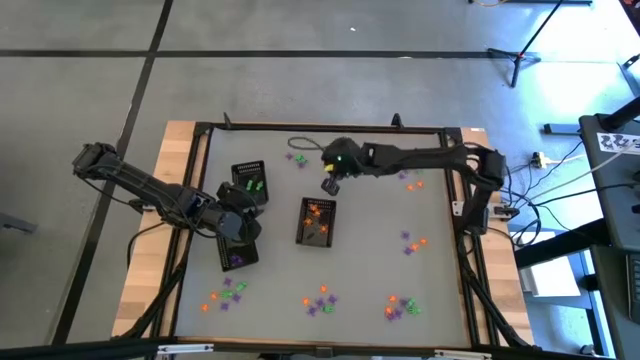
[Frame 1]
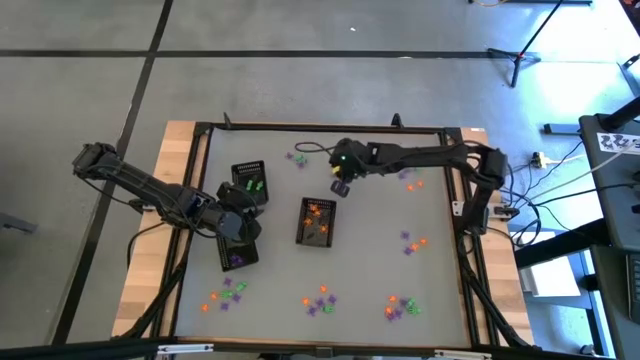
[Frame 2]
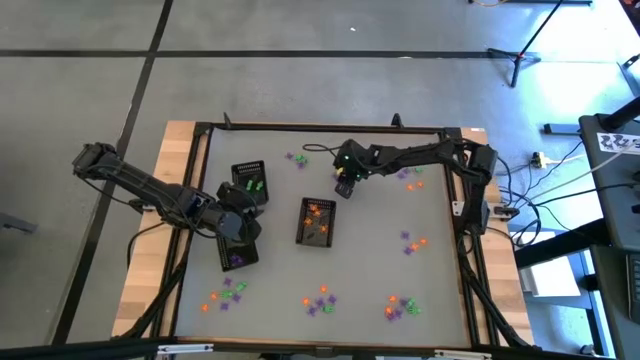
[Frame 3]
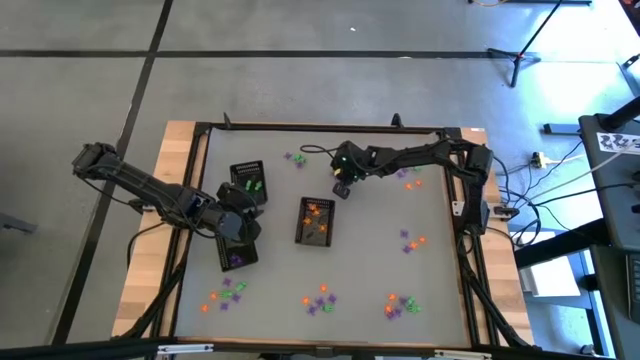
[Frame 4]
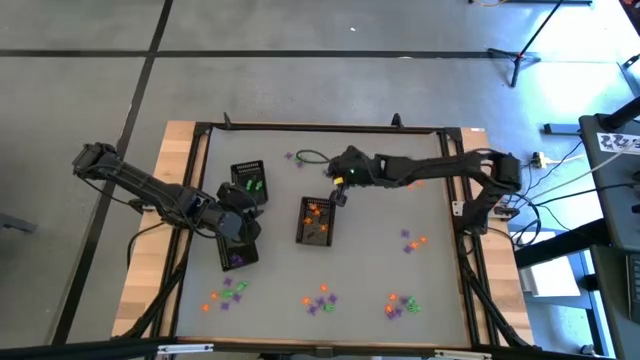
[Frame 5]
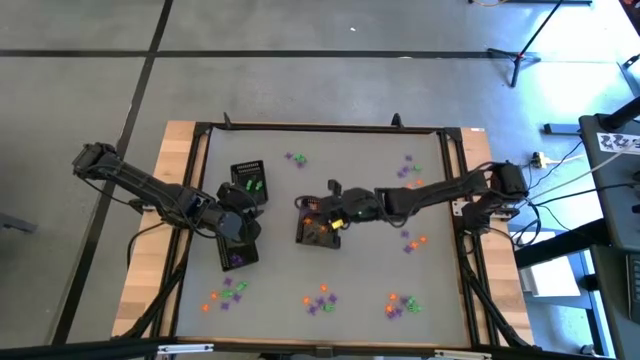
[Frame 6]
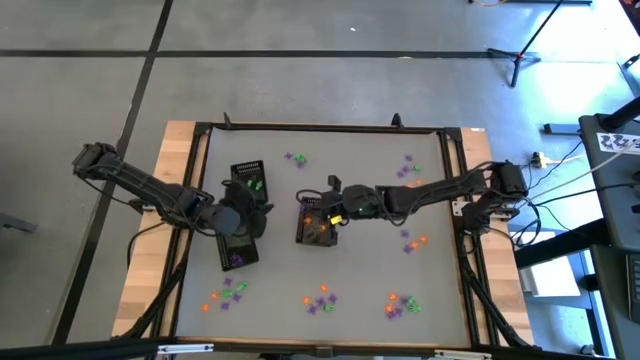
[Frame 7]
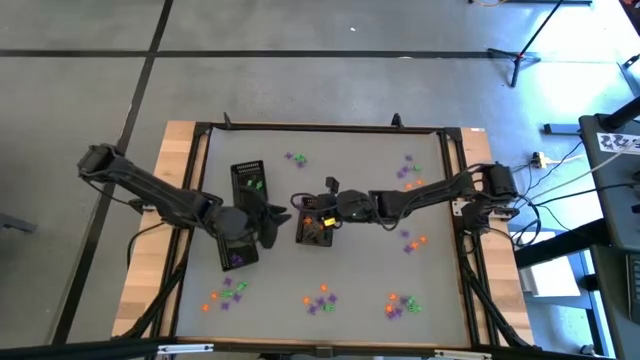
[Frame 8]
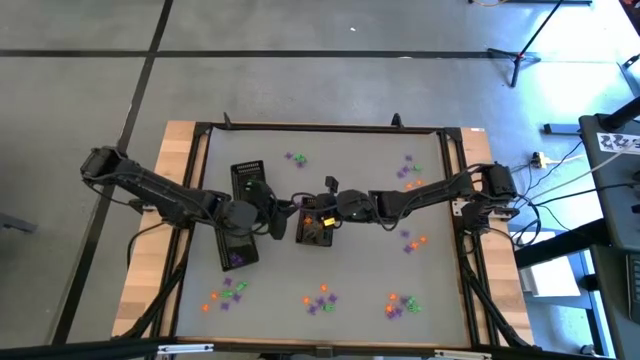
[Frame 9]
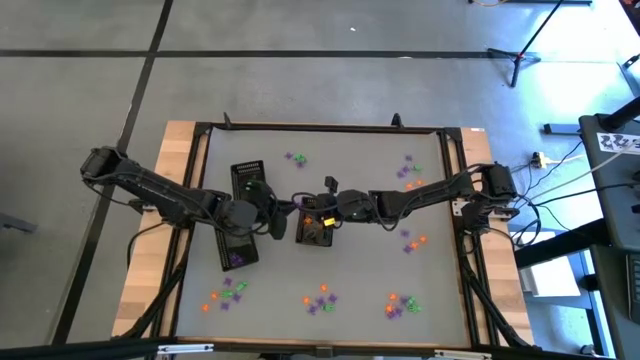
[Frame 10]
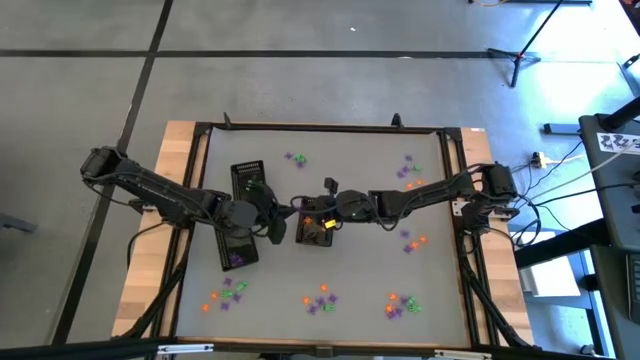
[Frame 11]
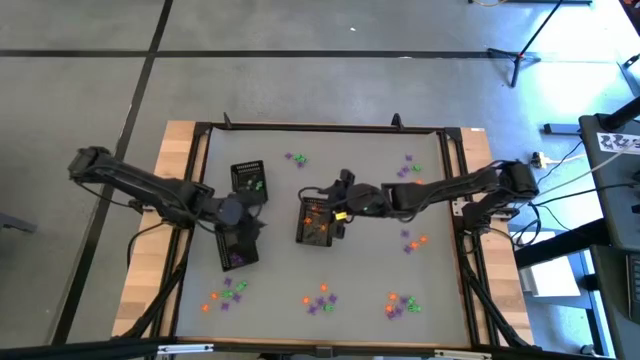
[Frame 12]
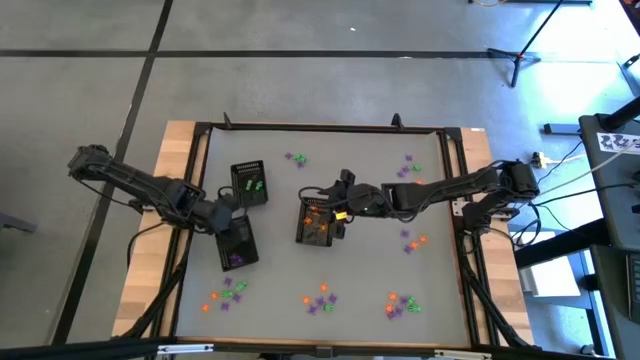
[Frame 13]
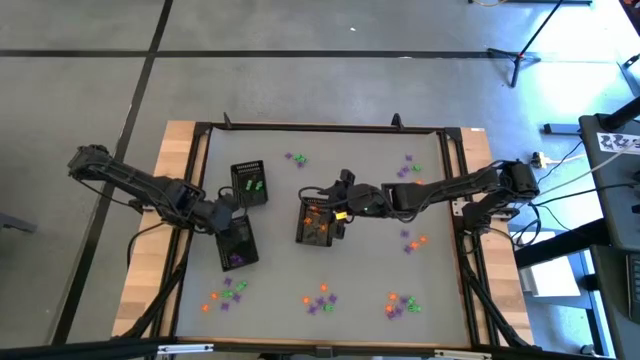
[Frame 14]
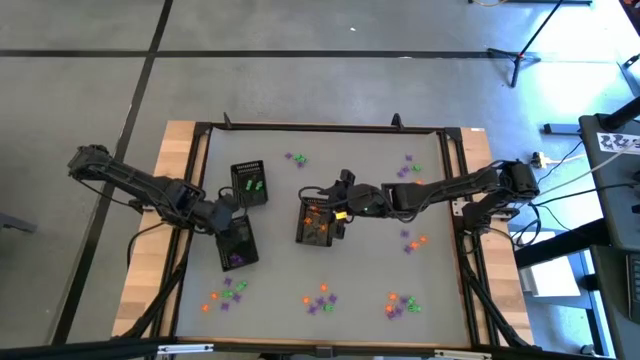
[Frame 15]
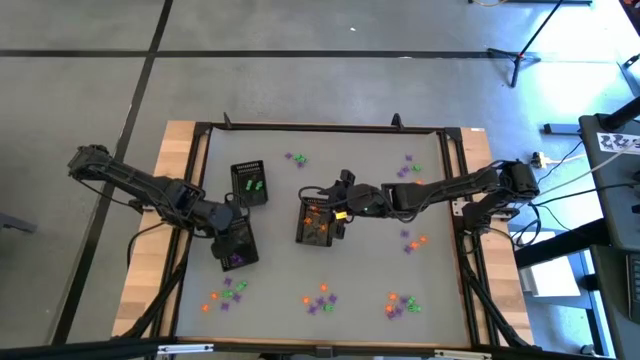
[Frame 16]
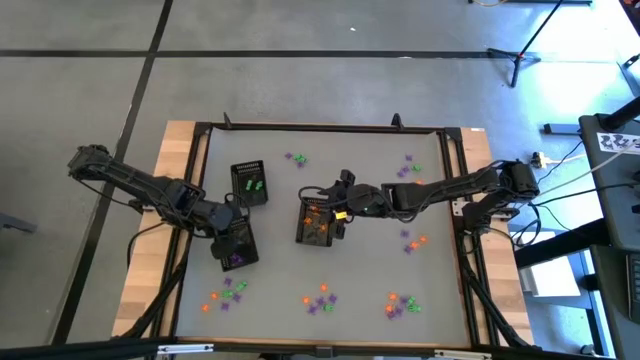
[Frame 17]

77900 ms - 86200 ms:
Task: Sort Halloween decoration
Put the purple spider toy into the bottom left black basket

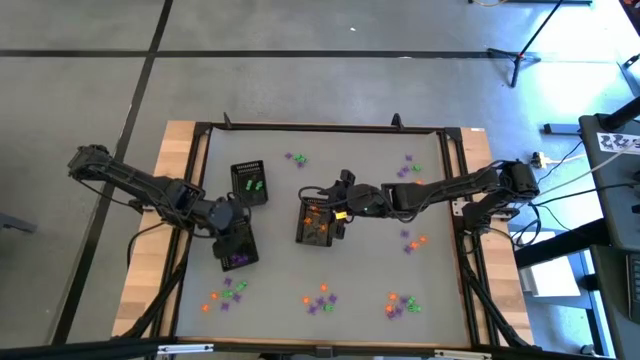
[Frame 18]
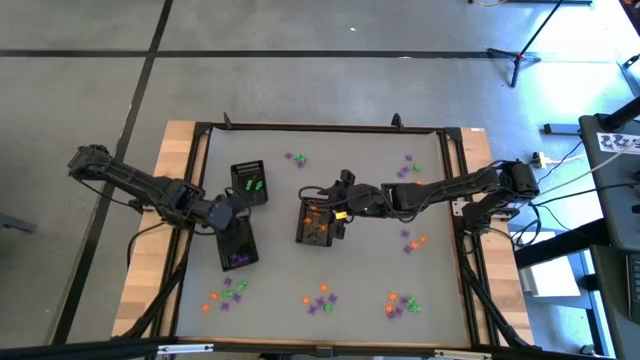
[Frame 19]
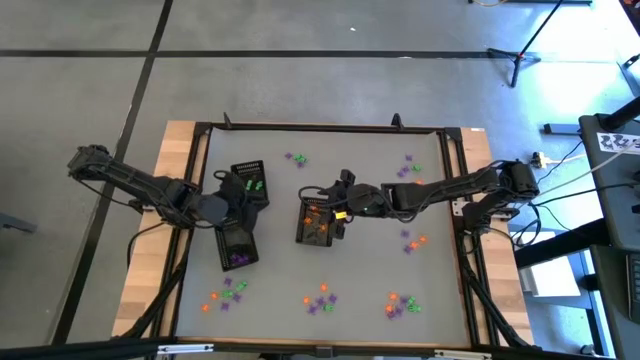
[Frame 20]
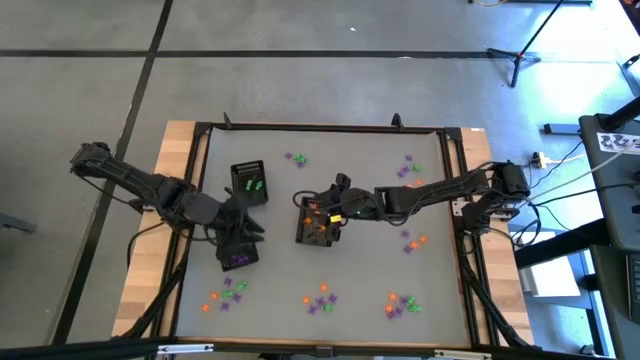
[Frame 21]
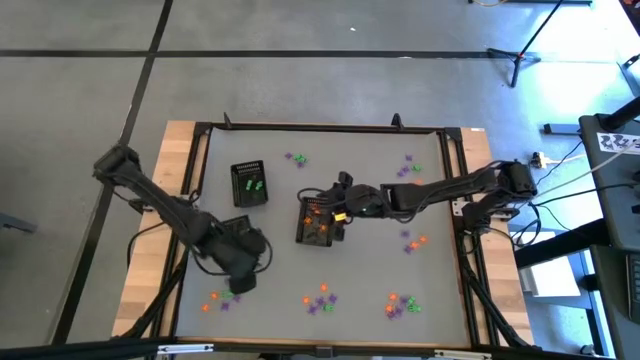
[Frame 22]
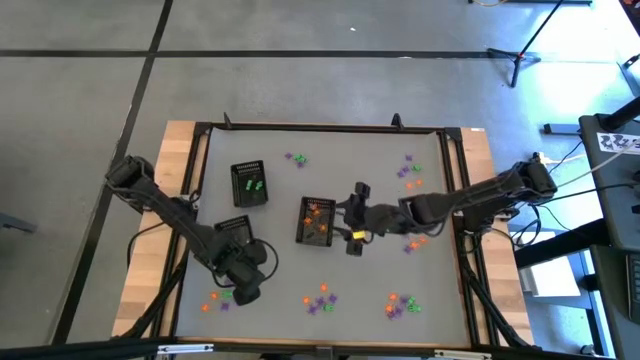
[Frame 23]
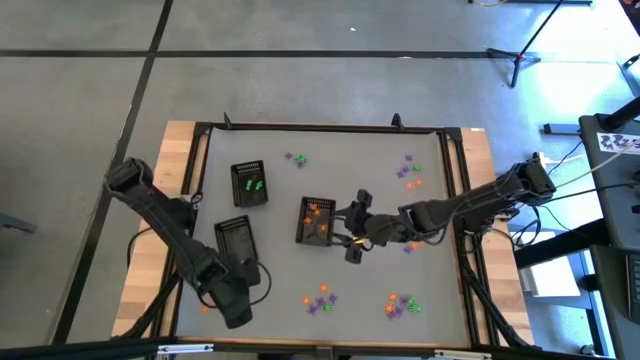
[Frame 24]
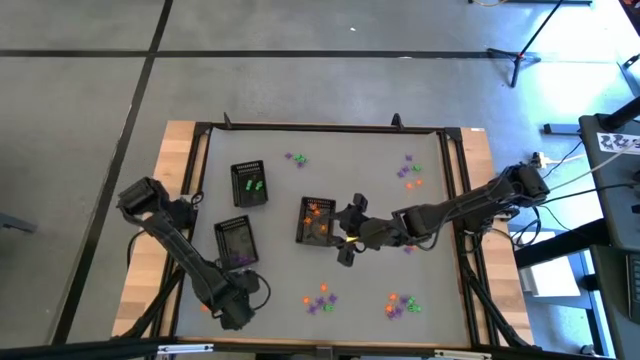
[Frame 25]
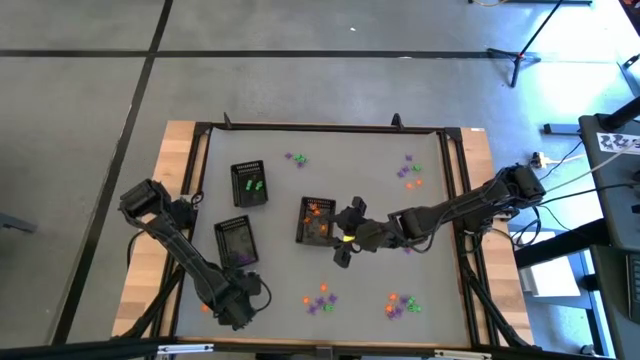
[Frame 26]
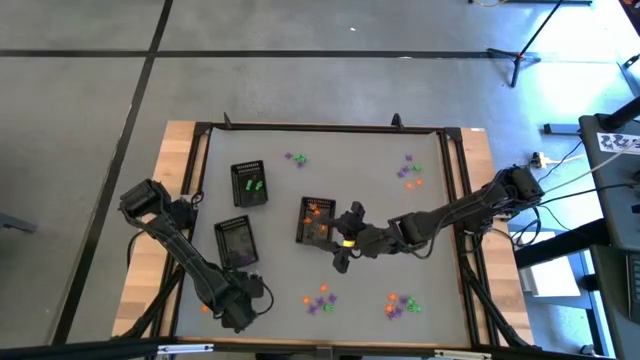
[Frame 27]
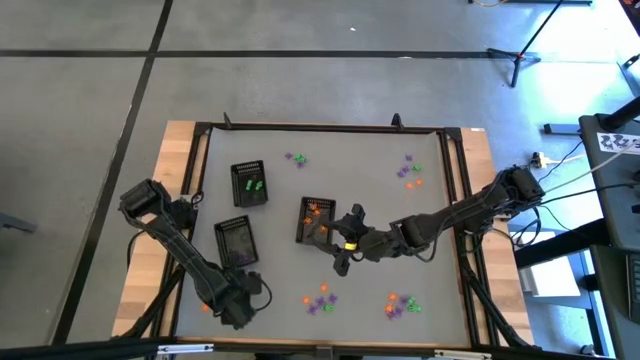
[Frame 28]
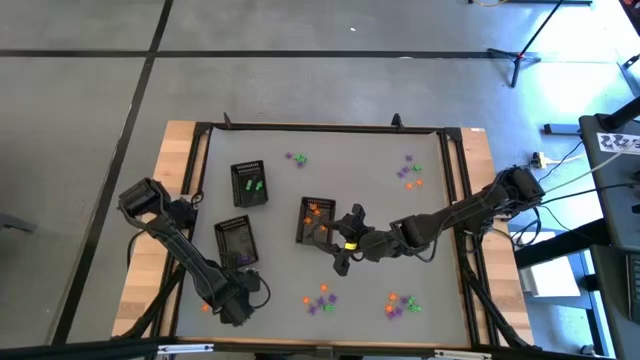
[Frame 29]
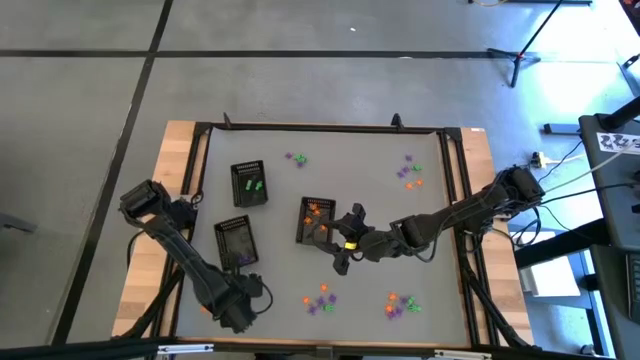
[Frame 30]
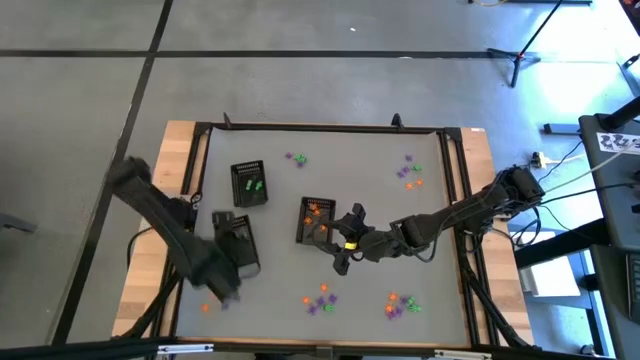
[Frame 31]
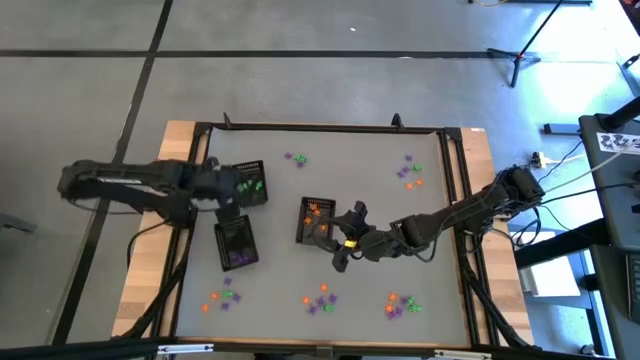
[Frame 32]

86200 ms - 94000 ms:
Put the green alien toy into the top left black basket

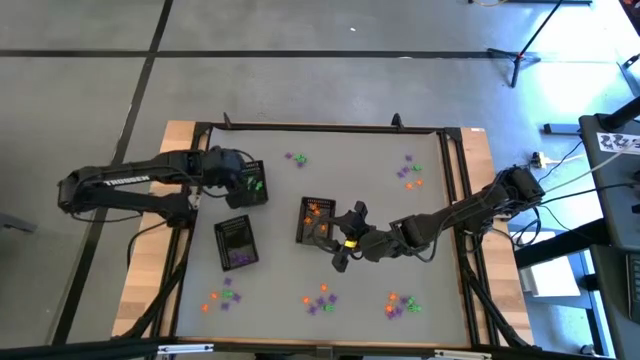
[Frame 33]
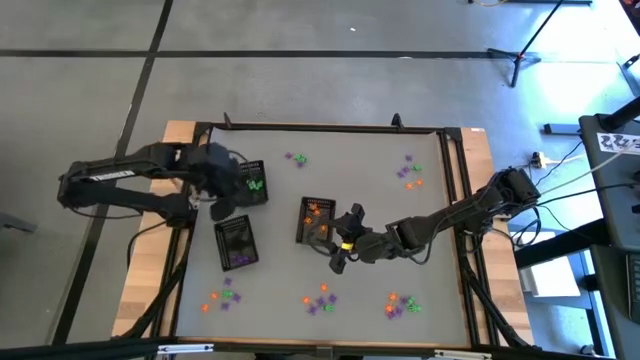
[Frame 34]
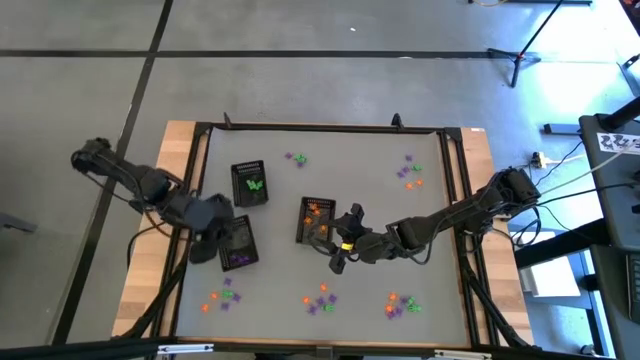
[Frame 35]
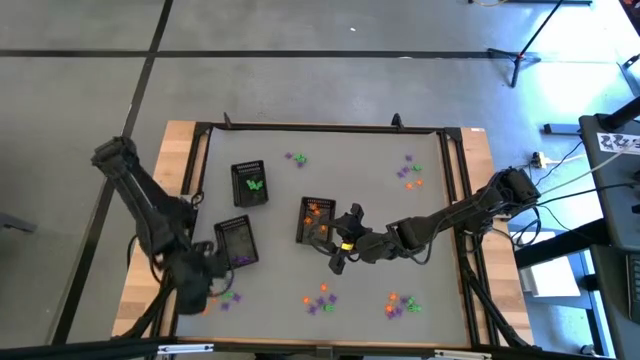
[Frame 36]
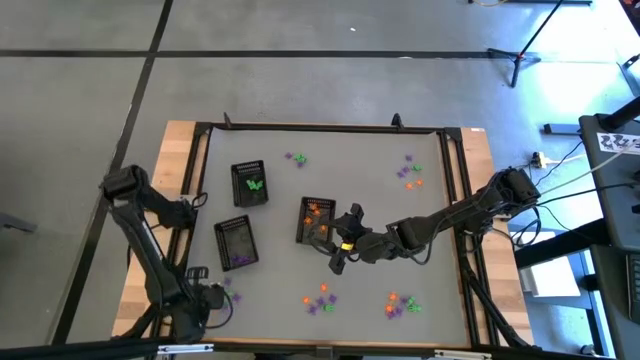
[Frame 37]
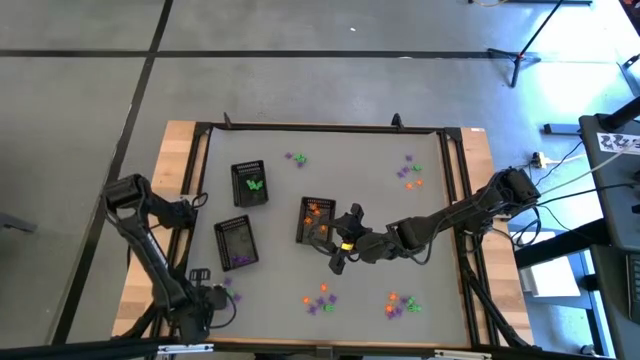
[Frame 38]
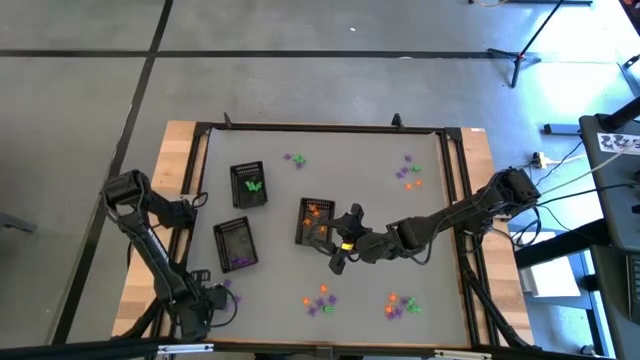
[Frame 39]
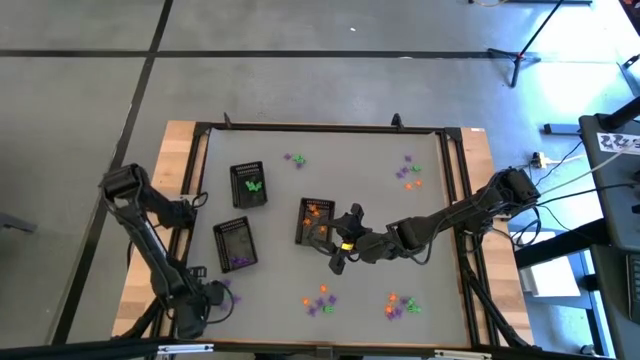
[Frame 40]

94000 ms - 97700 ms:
Put the orange spider toy into the bottom right black basket

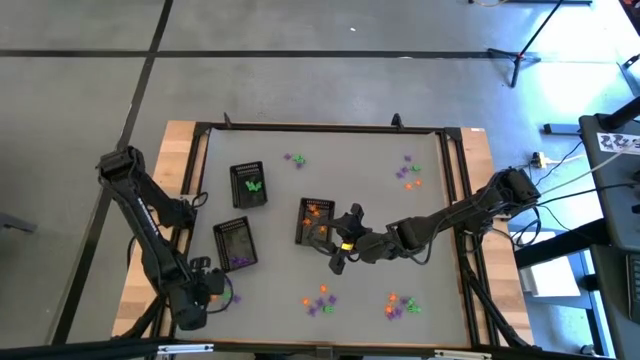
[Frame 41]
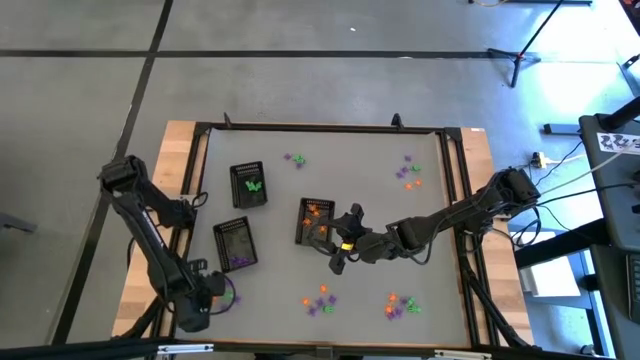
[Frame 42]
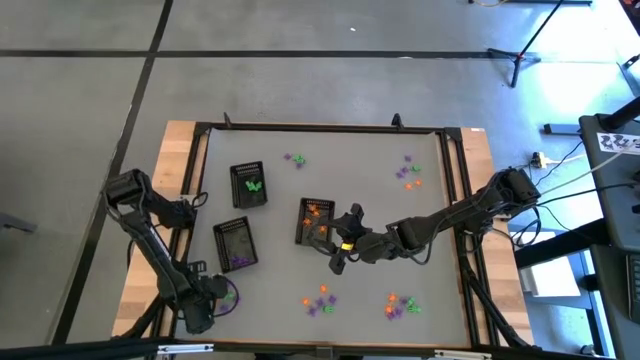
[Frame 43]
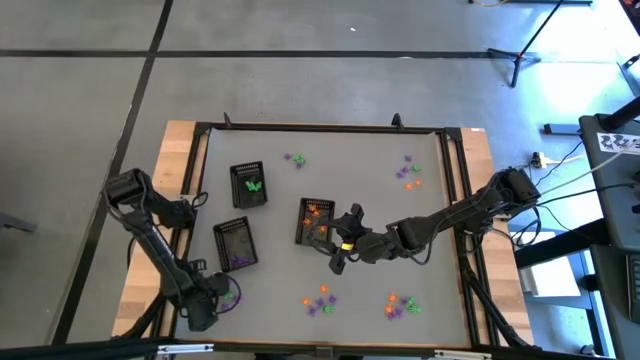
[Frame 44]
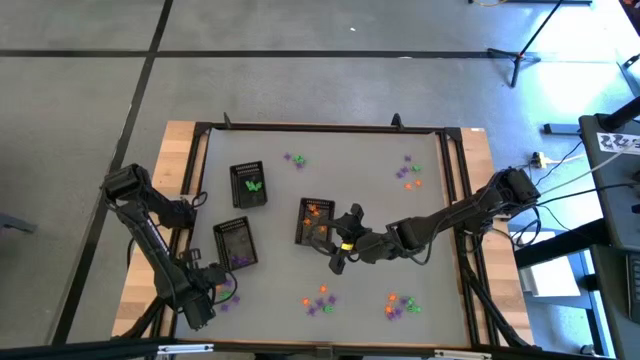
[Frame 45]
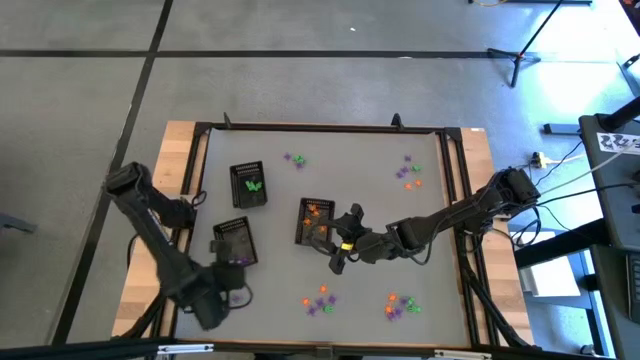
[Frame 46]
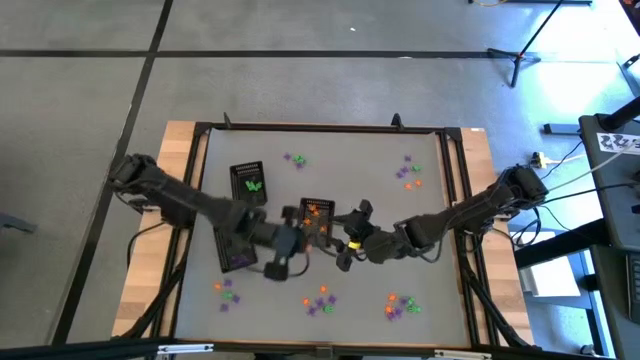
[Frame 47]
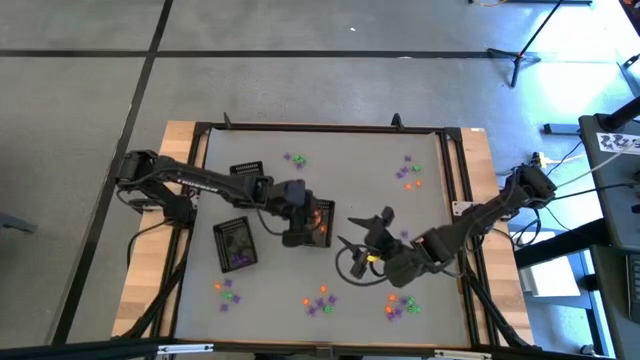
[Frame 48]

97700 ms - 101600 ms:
Put the orange spider toy into the bottom right black basket
